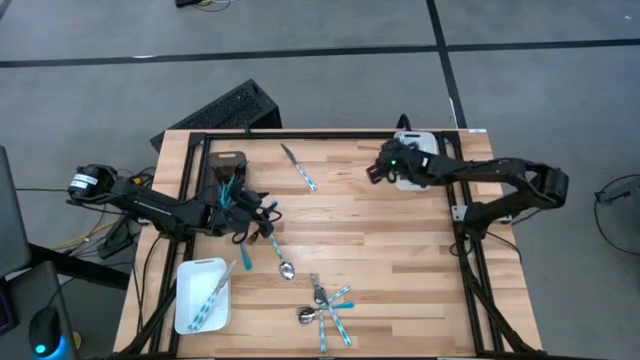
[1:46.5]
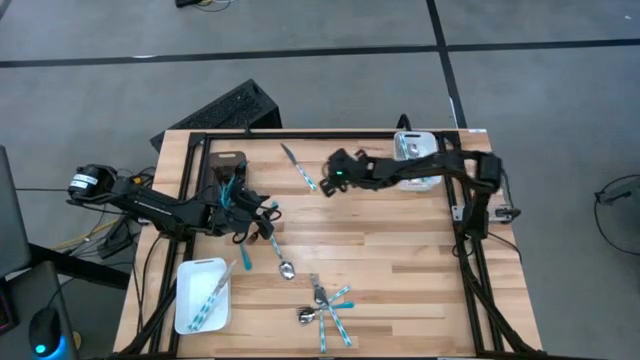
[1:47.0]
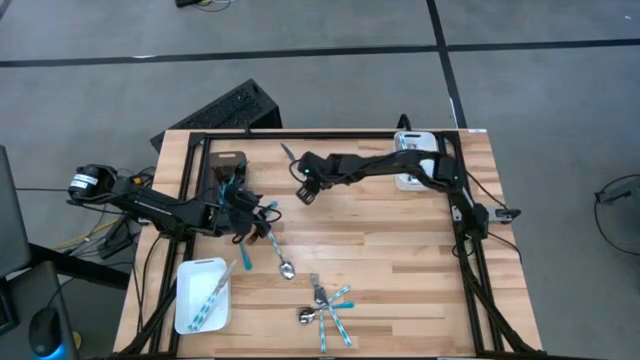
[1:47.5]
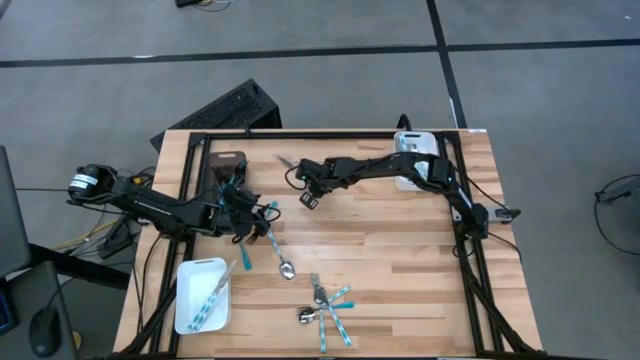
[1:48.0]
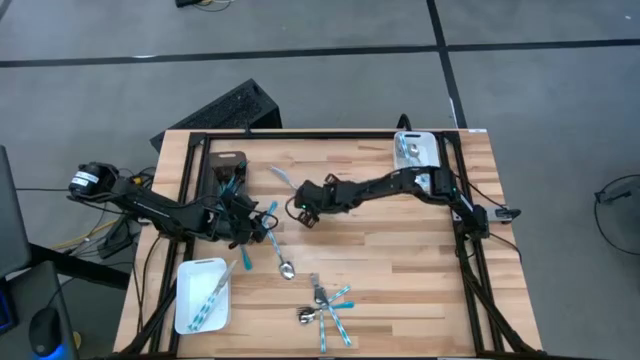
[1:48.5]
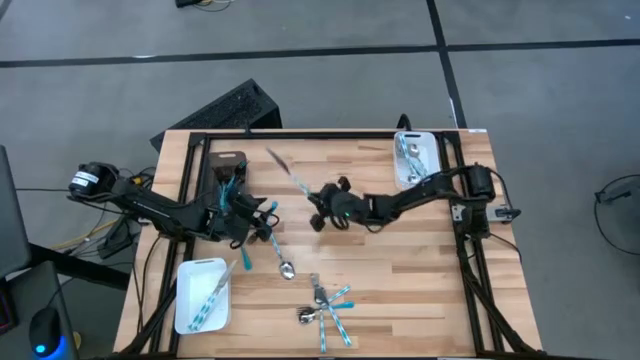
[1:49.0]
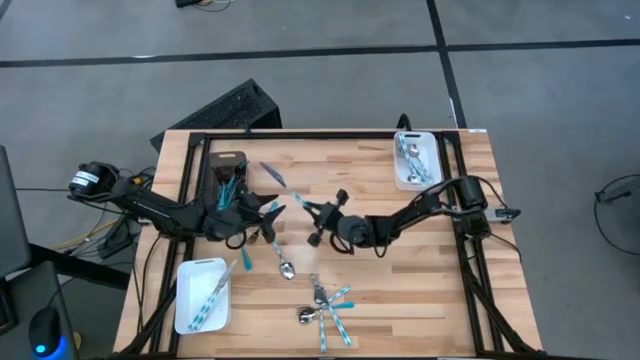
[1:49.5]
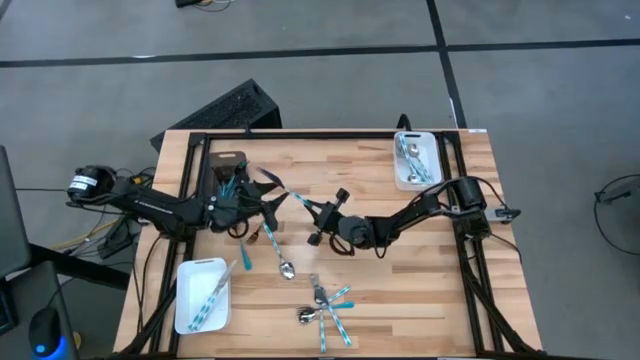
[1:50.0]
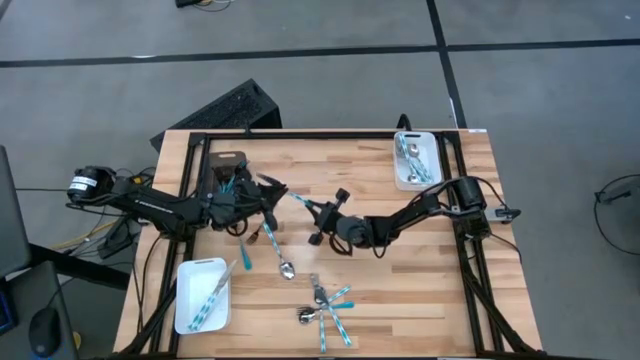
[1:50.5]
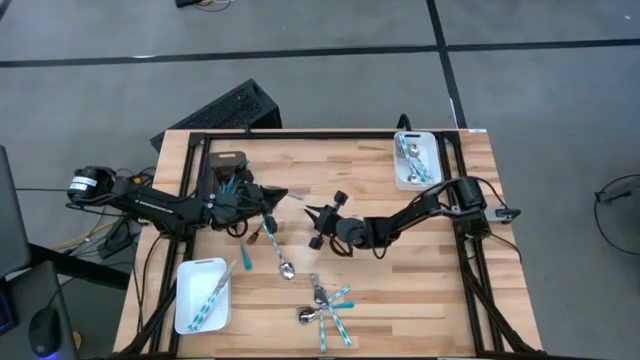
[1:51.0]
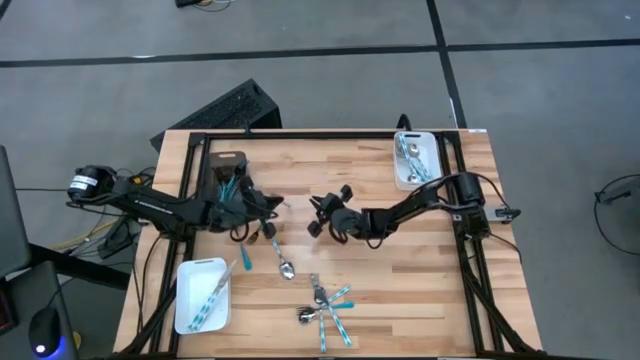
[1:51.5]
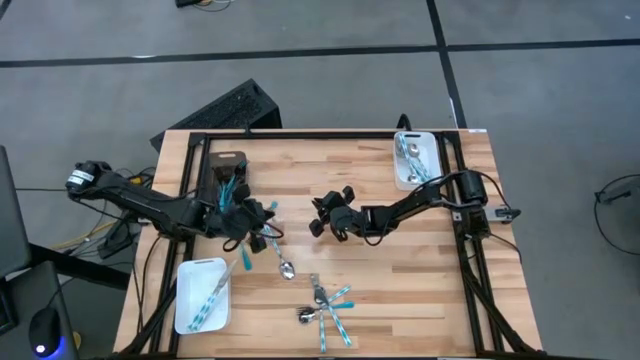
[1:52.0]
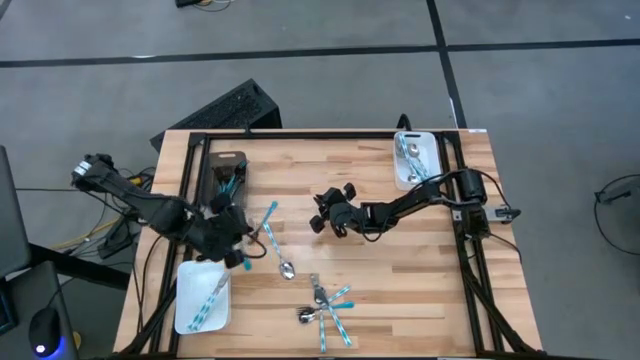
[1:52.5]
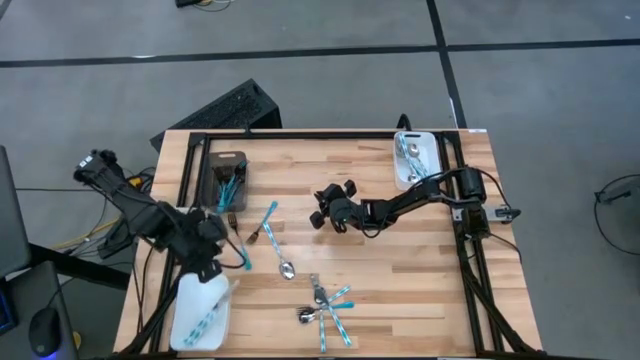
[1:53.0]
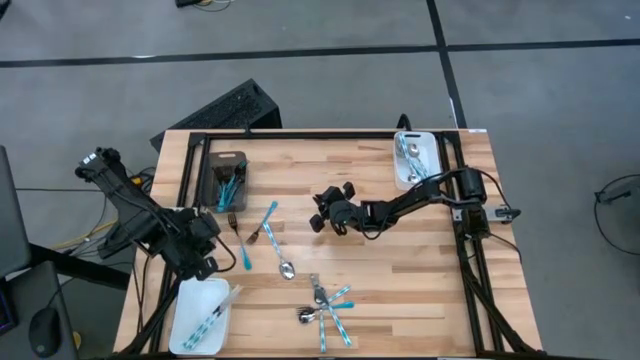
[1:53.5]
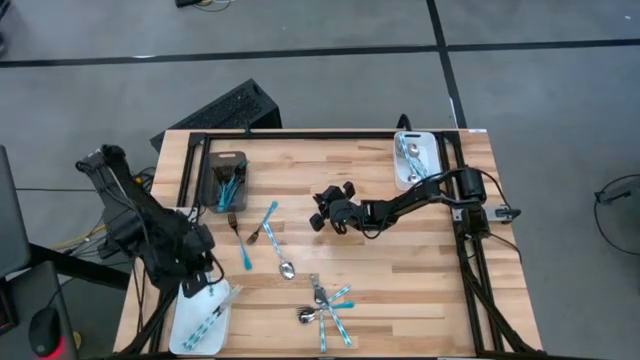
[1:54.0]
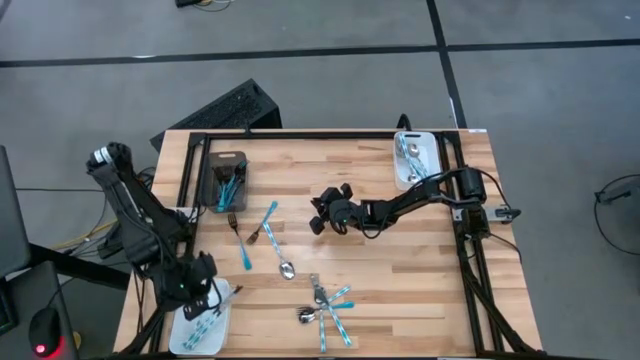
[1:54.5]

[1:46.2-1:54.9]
Task: Sort silverware by color (type)
Put the blue patterned knife into the bottom left white bin

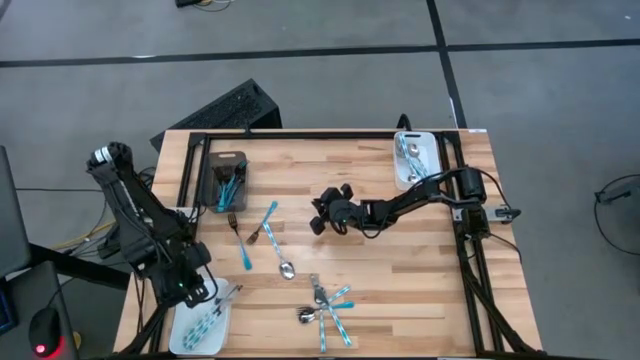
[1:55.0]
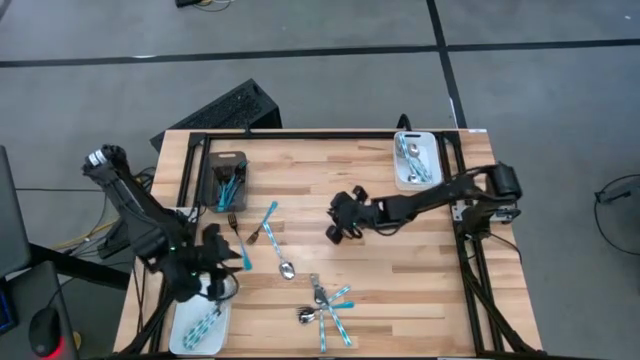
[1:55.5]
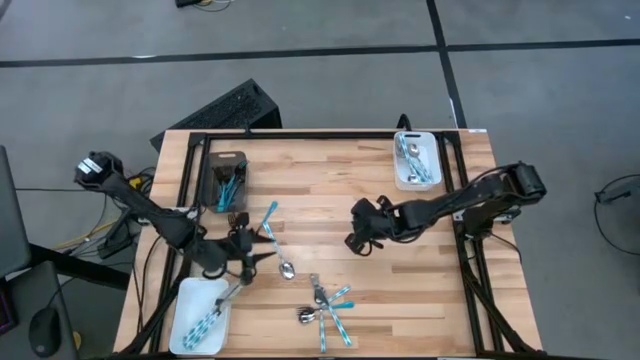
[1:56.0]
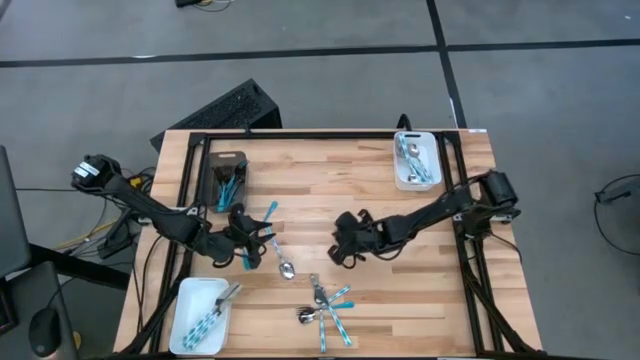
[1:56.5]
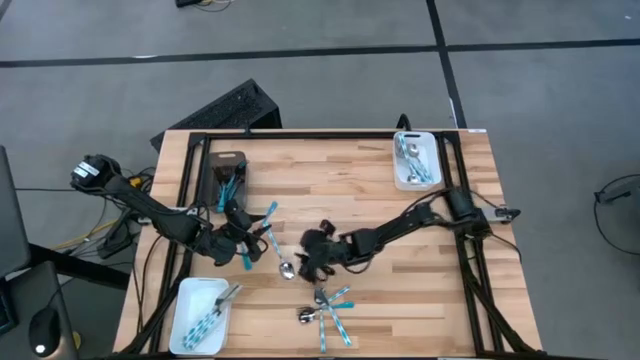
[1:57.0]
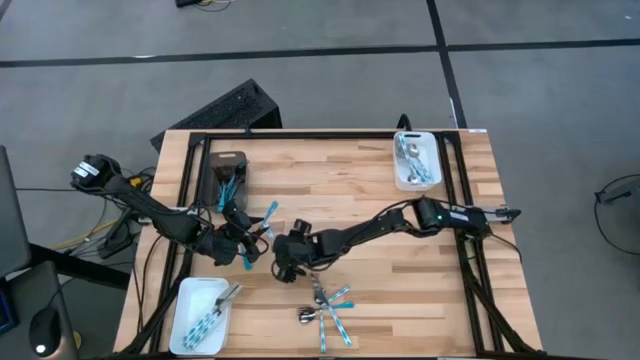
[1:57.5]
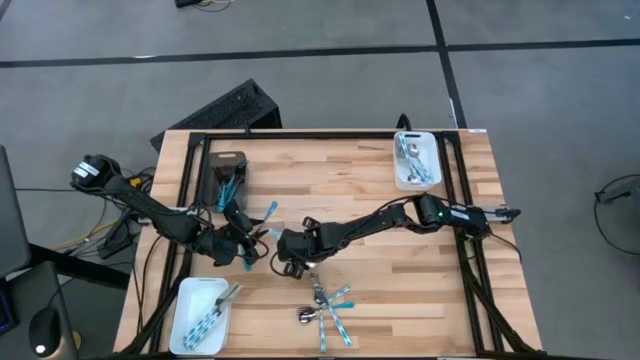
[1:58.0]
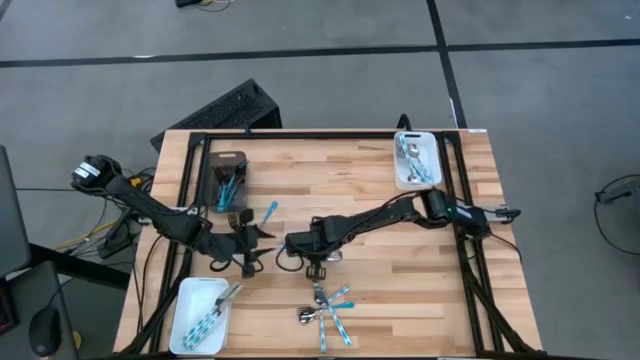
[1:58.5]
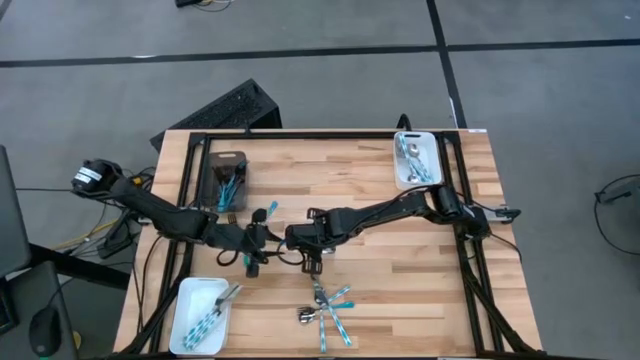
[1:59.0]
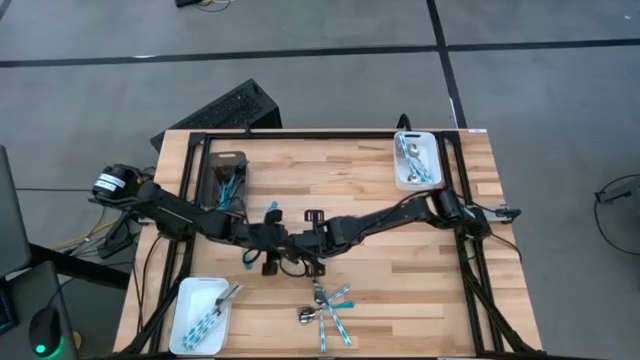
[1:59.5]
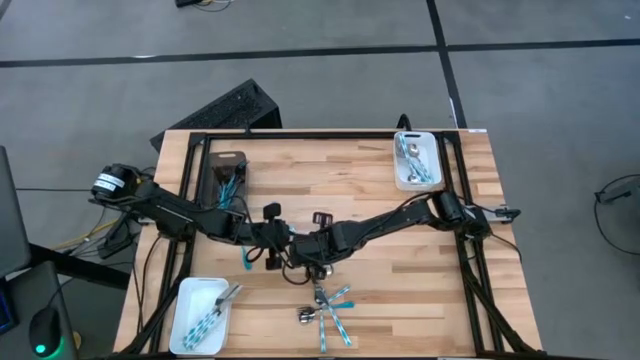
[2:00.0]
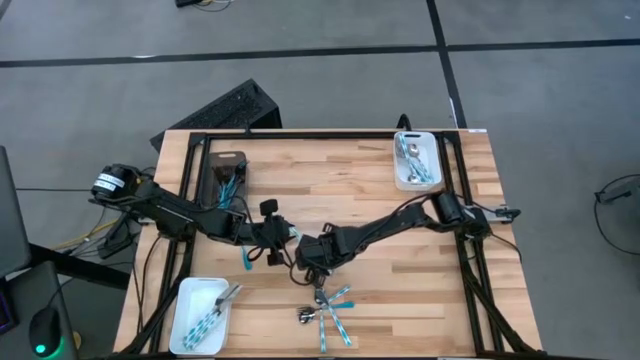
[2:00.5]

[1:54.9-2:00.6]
Put the blue patterned spoon into the top right white bin

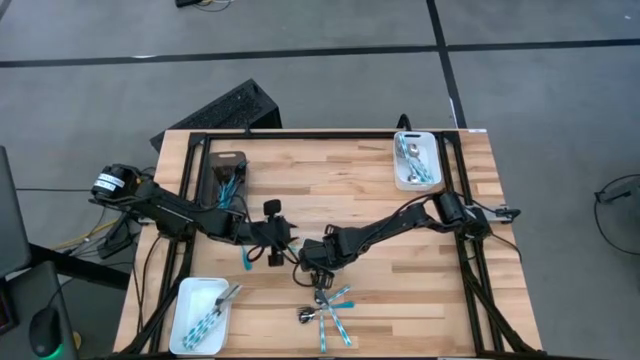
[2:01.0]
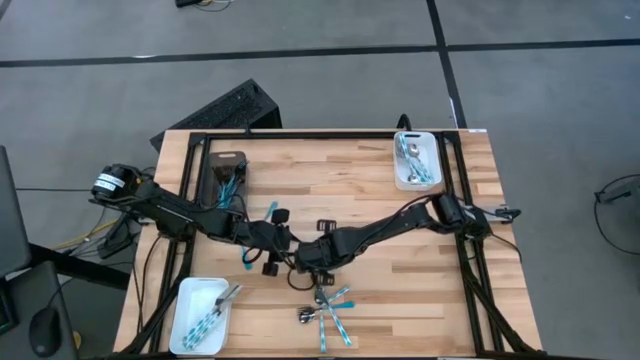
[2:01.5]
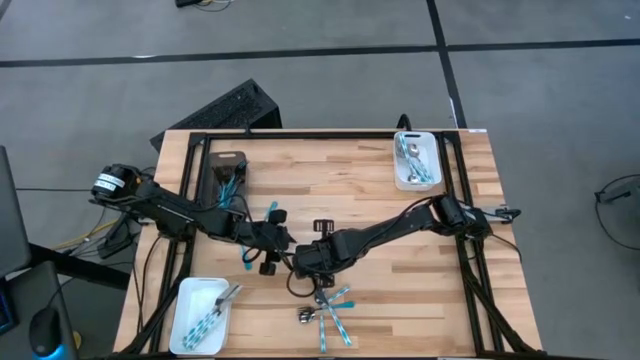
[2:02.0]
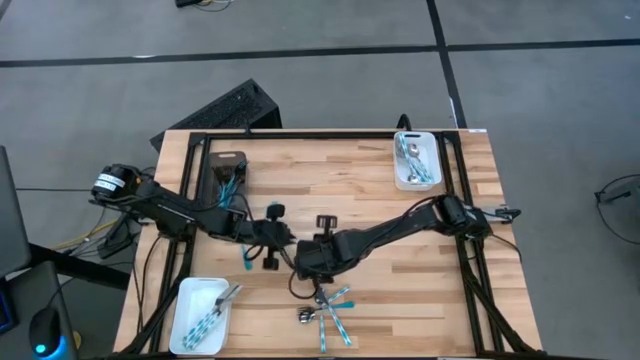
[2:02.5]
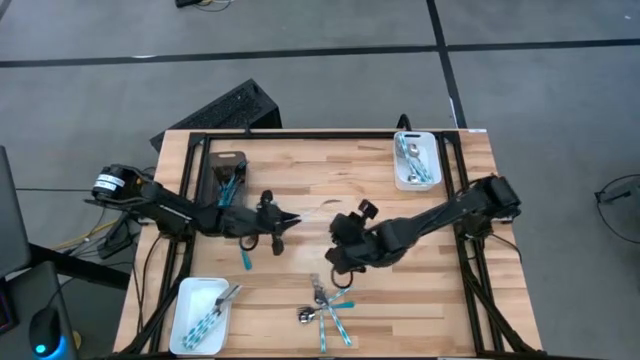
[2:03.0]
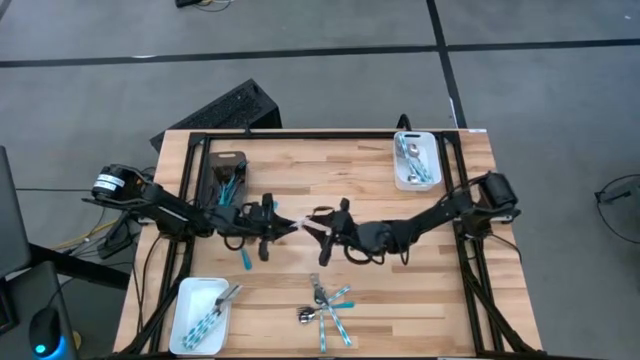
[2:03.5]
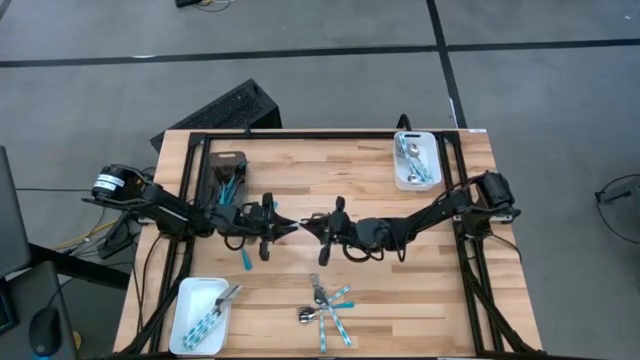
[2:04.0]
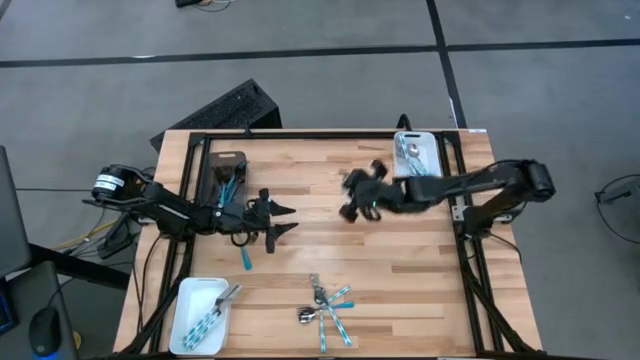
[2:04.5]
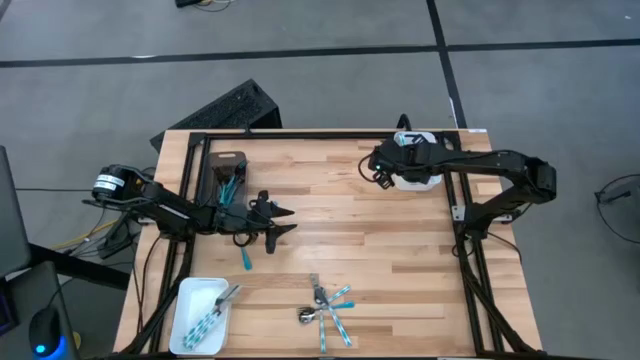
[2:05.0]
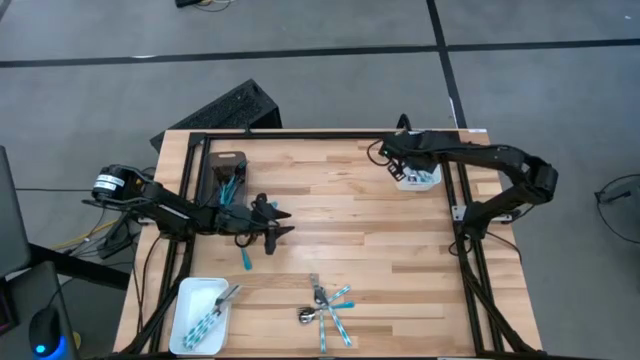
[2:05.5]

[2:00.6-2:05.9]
Put the blue patterned spoon into the top right white bin

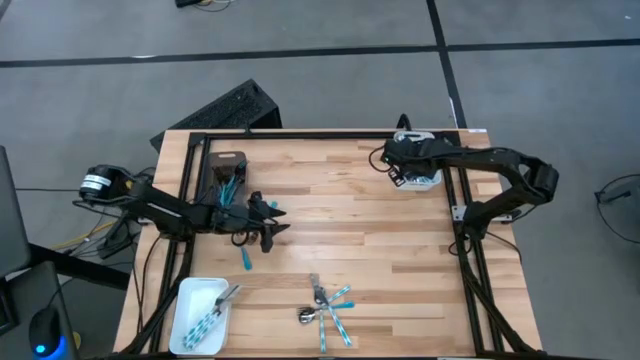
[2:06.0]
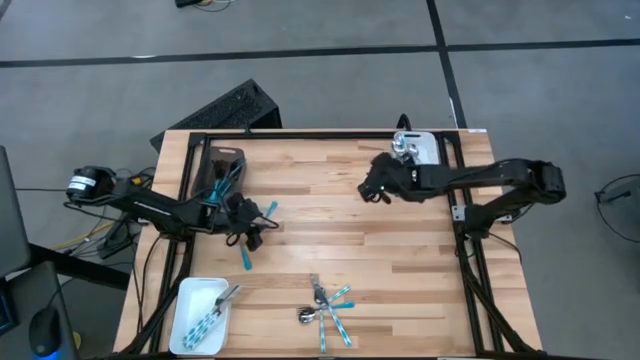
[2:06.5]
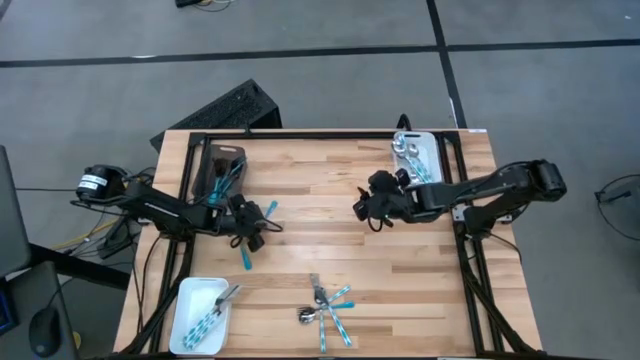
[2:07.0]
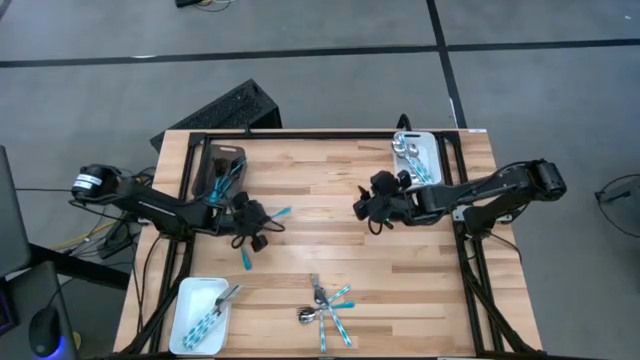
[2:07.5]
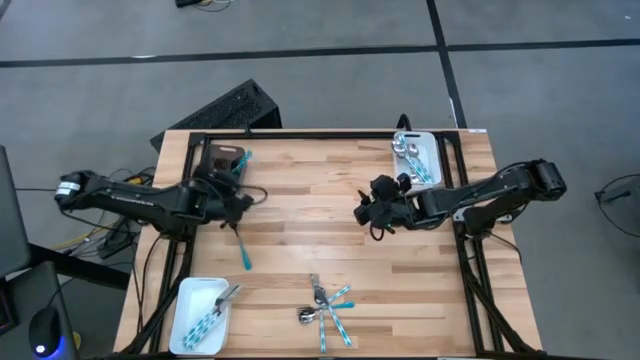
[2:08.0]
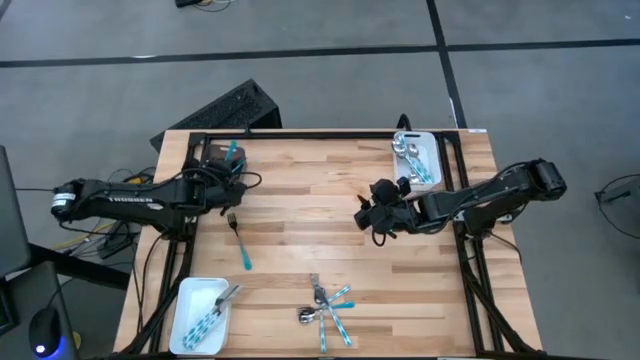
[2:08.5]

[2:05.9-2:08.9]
Put the blue fork into the black bin
